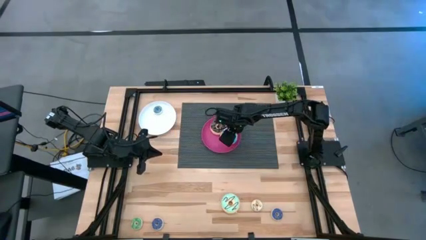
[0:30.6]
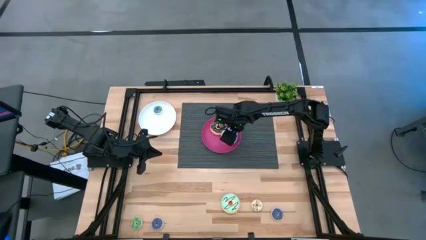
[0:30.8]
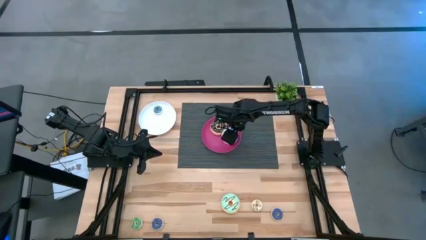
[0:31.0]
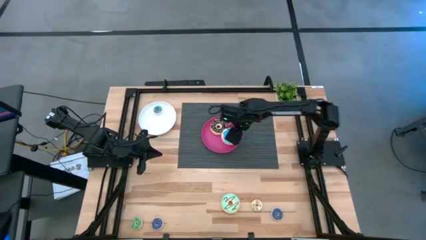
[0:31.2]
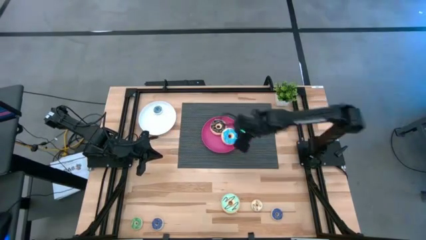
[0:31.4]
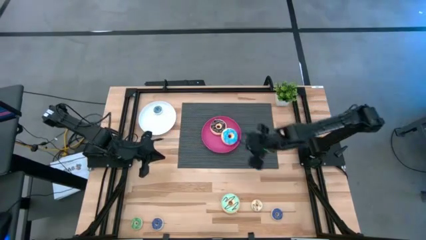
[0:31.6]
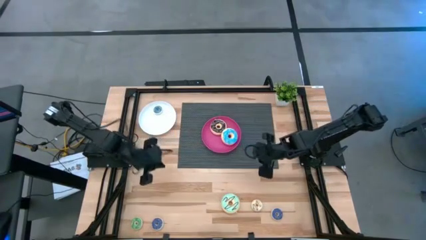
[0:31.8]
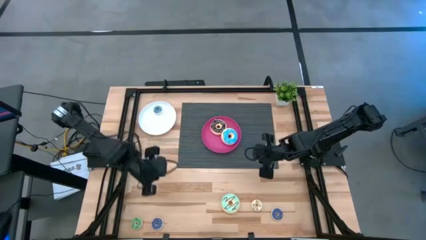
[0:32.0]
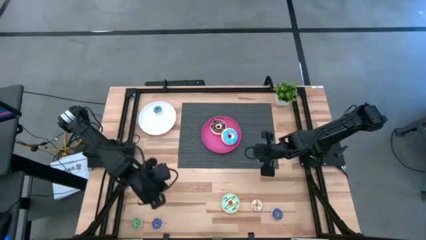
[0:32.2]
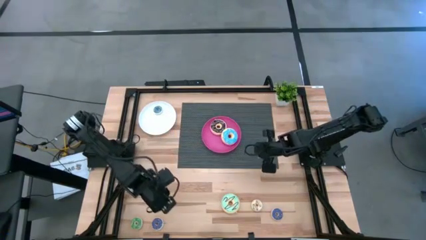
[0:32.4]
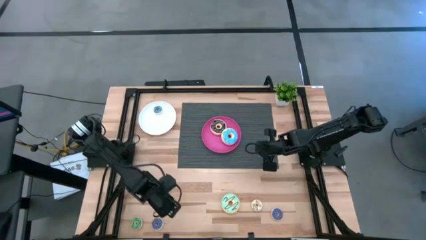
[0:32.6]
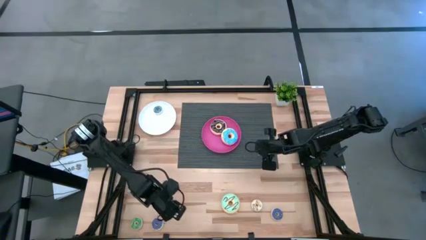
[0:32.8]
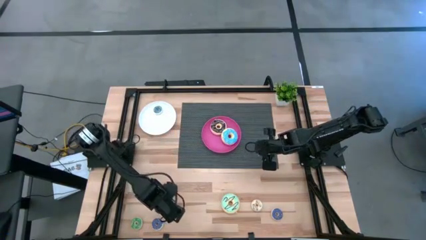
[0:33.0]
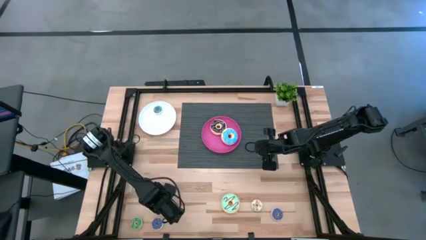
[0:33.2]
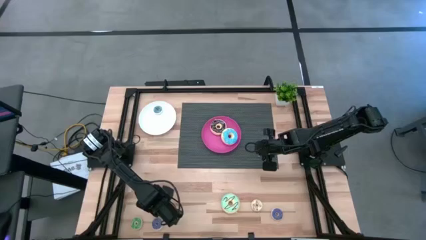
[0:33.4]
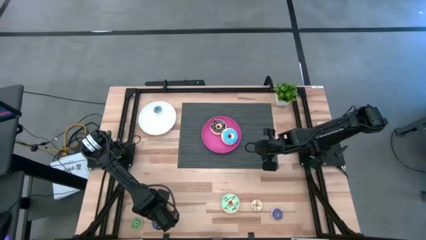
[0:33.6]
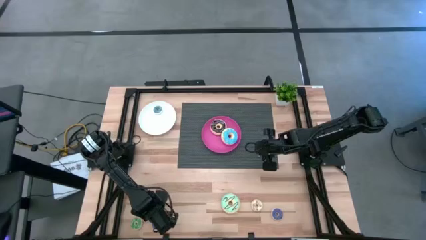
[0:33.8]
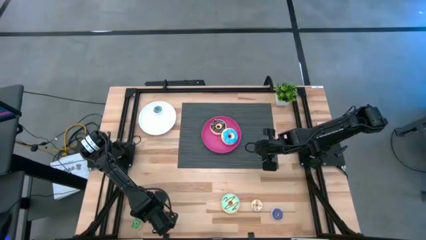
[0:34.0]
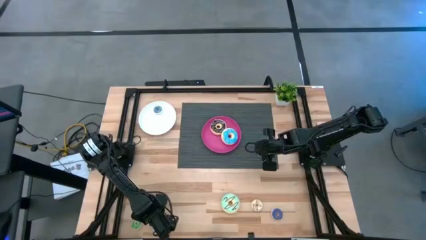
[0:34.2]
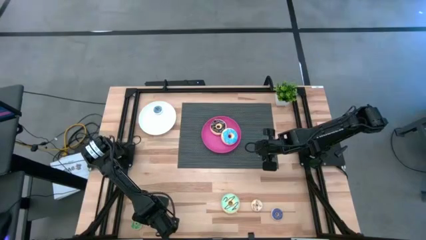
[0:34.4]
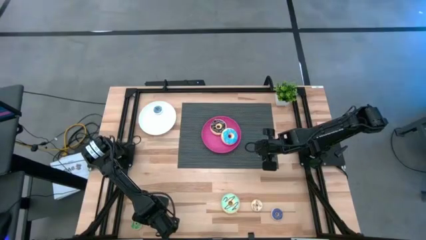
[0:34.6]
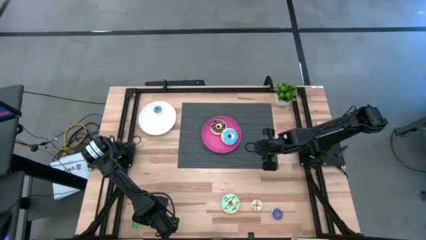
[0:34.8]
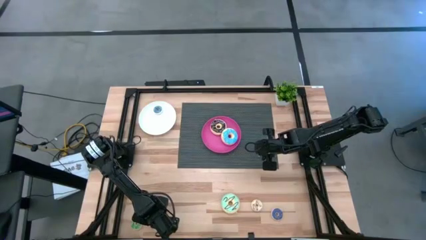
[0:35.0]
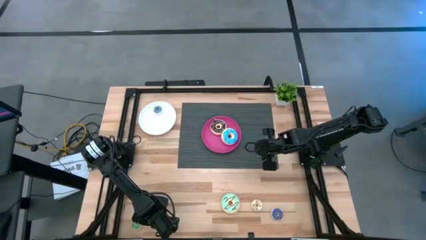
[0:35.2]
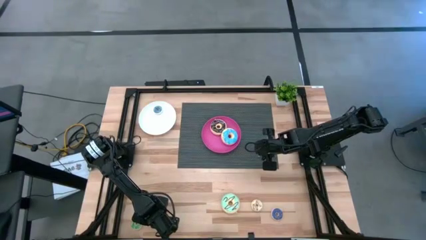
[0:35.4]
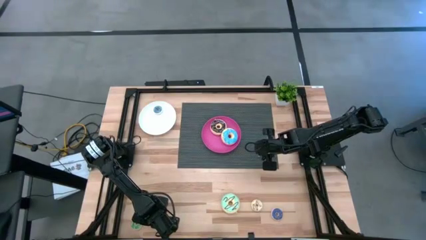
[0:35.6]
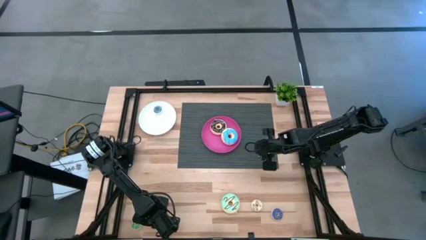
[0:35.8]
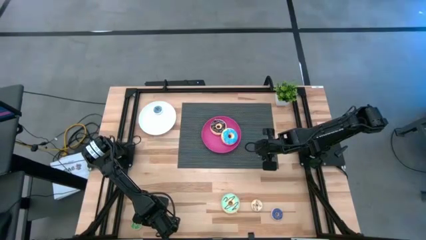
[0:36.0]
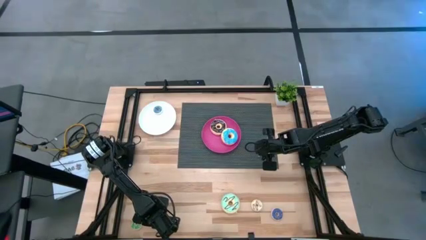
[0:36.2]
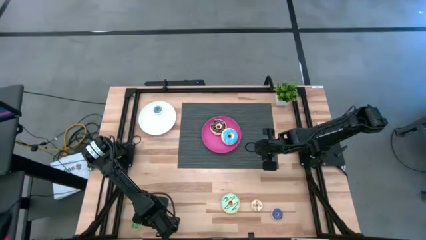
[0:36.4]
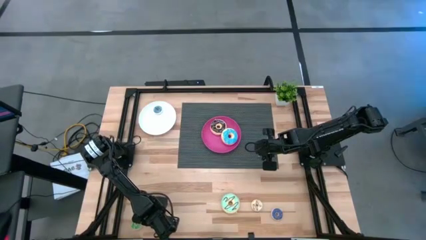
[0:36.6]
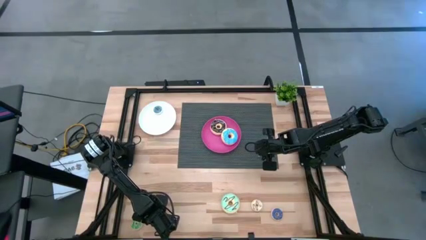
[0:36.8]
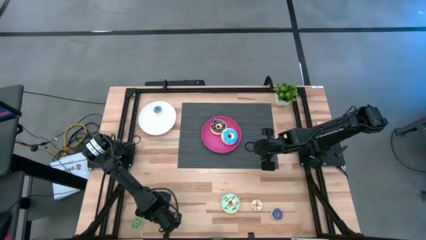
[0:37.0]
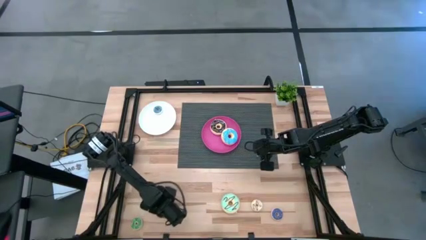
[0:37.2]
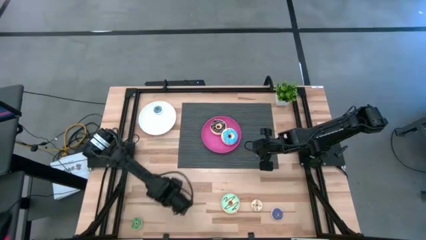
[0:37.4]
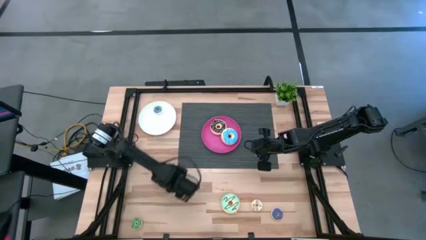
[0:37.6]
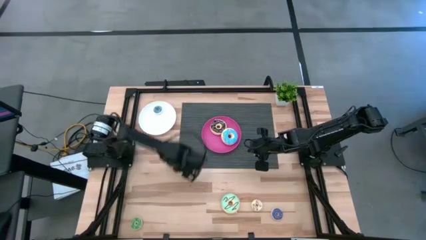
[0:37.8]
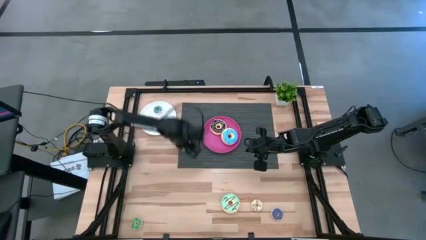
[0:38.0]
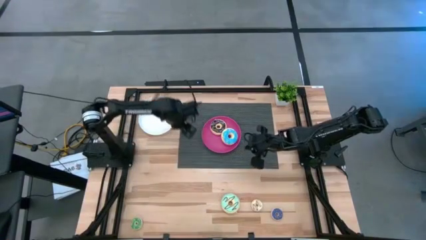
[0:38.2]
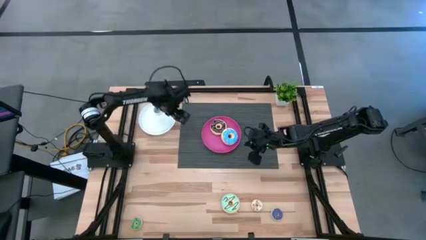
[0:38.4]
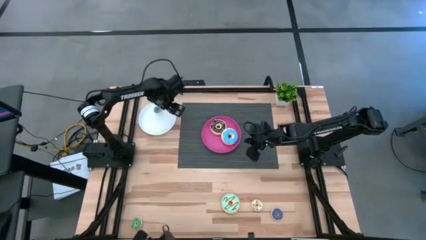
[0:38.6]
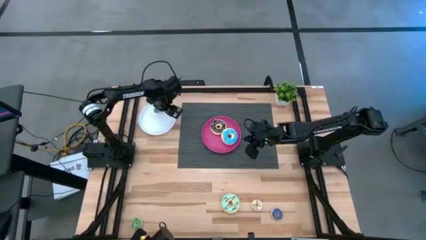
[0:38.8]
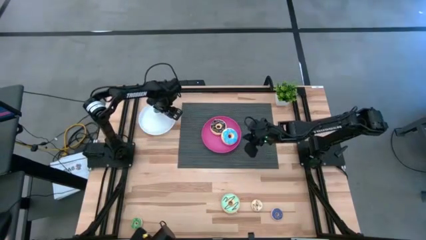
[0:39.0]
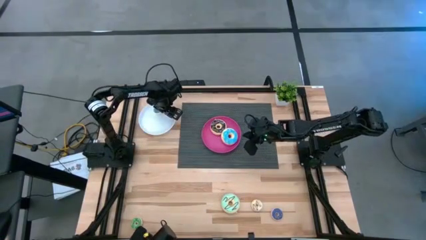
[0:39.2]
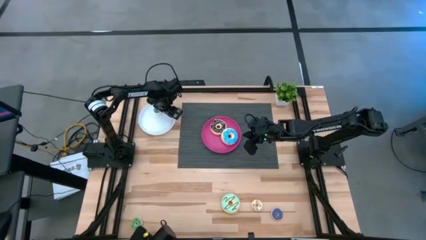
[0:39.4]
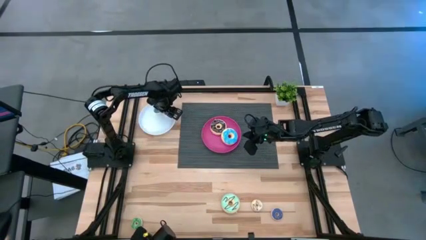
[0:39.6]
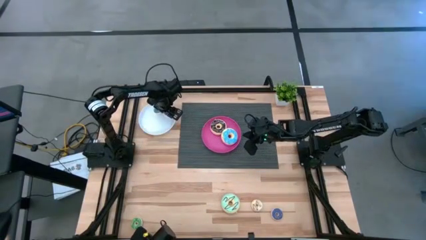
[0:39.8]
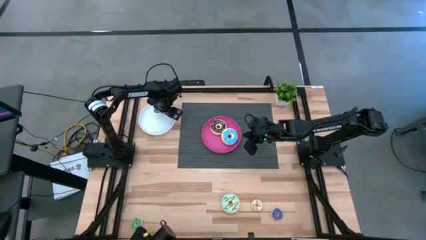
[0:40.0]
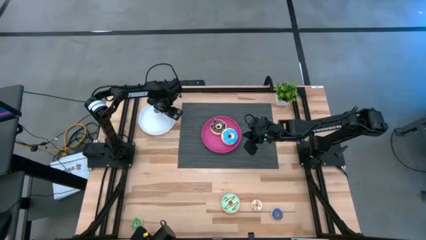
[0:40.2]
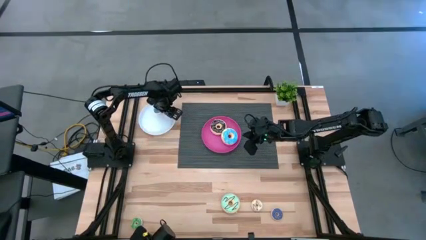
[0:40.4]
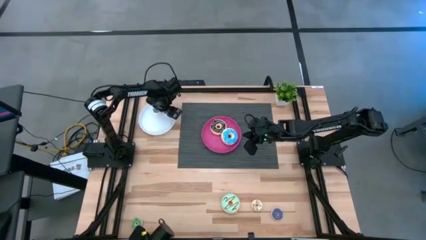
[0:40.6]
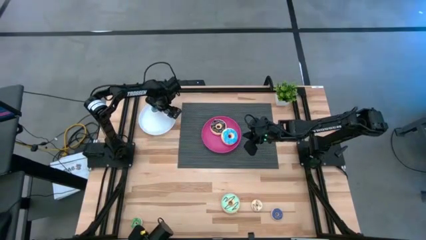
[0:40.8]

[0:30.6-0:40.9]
Task: Pick & Place donuts
Put the left small violet donut on the white plate

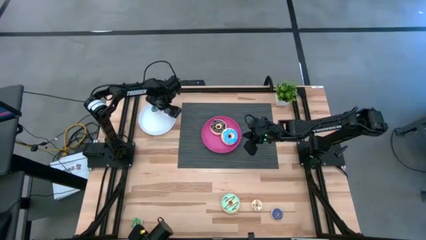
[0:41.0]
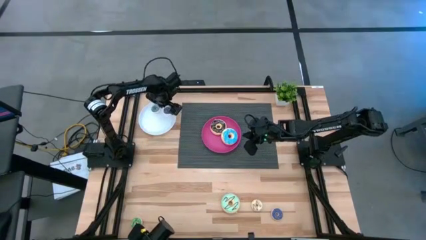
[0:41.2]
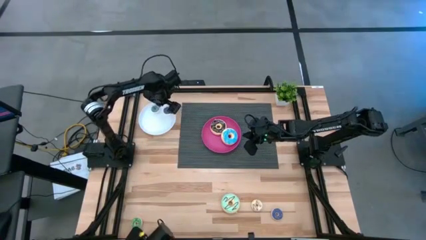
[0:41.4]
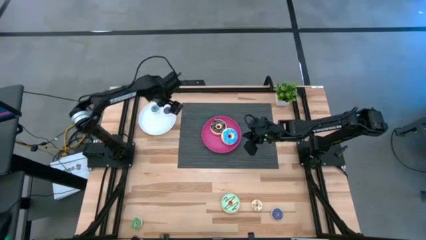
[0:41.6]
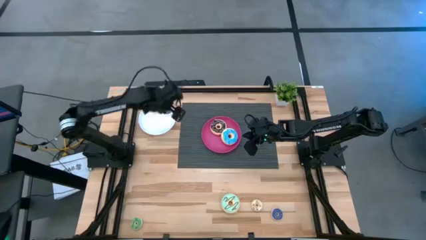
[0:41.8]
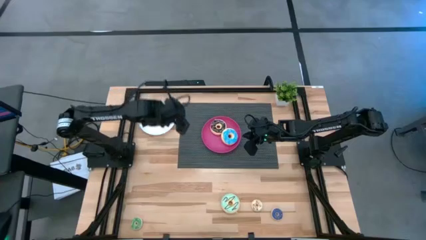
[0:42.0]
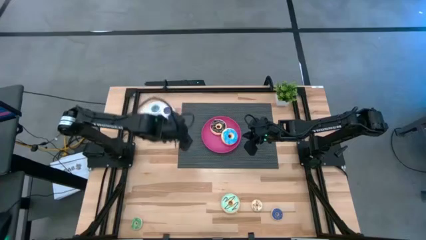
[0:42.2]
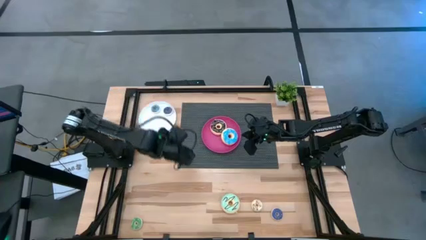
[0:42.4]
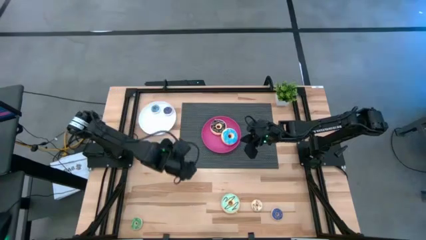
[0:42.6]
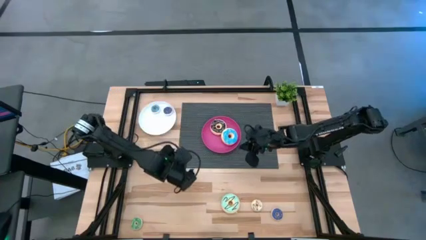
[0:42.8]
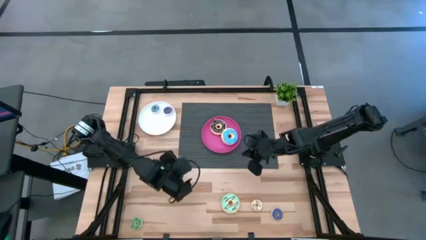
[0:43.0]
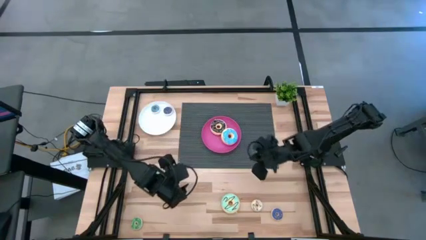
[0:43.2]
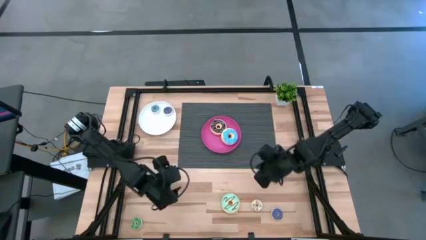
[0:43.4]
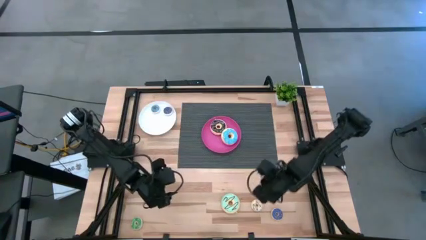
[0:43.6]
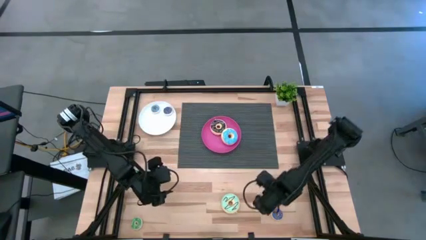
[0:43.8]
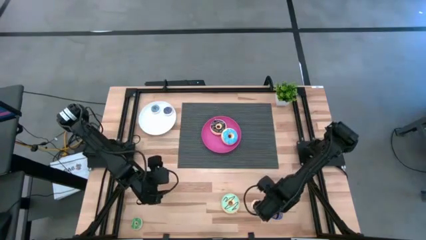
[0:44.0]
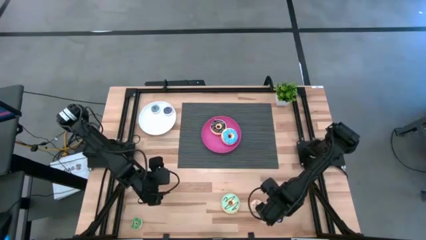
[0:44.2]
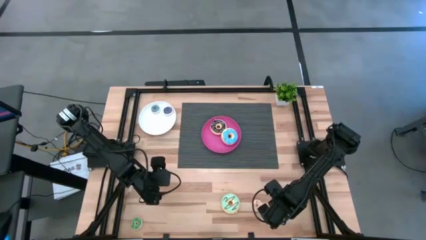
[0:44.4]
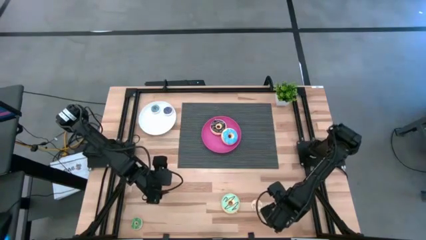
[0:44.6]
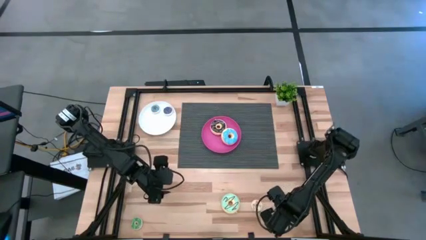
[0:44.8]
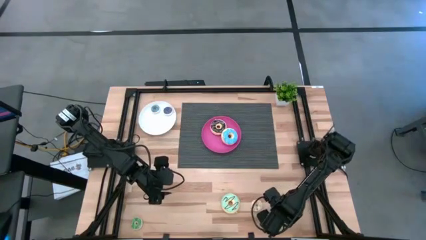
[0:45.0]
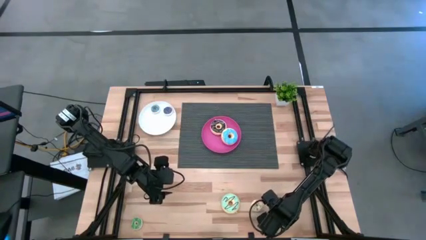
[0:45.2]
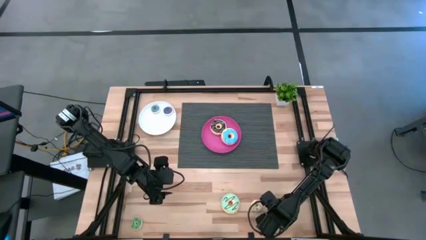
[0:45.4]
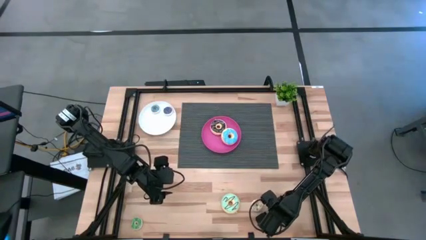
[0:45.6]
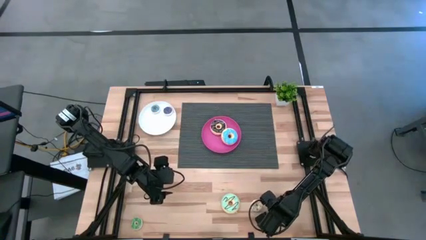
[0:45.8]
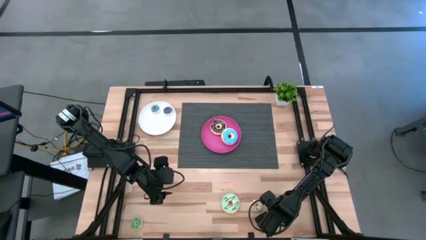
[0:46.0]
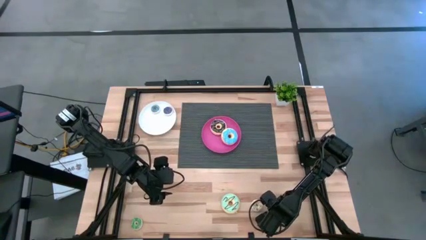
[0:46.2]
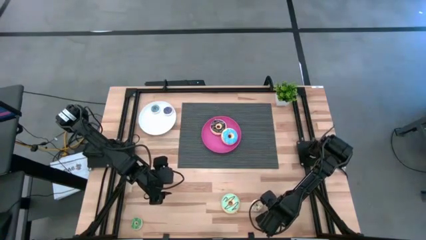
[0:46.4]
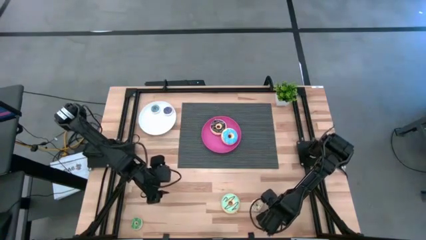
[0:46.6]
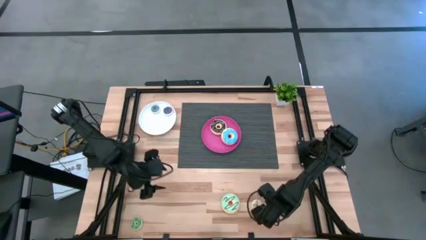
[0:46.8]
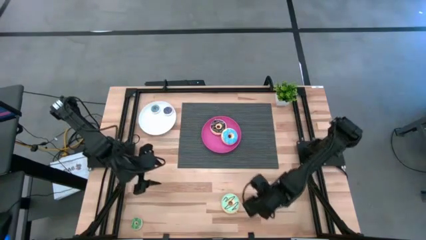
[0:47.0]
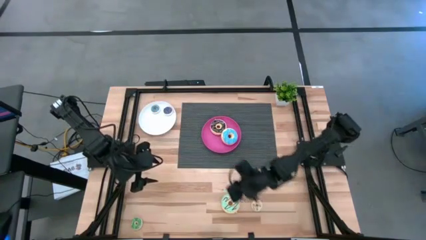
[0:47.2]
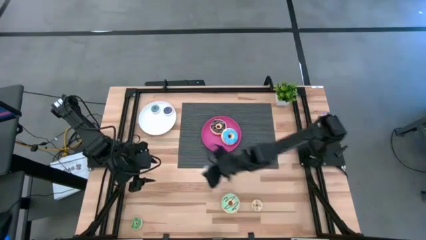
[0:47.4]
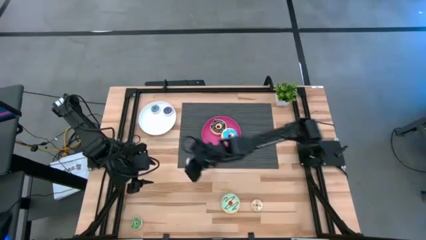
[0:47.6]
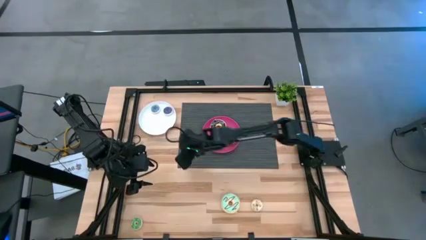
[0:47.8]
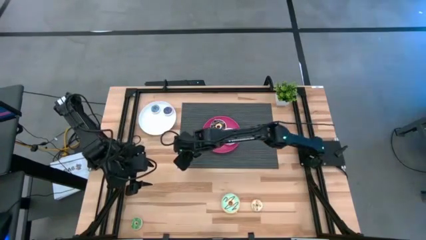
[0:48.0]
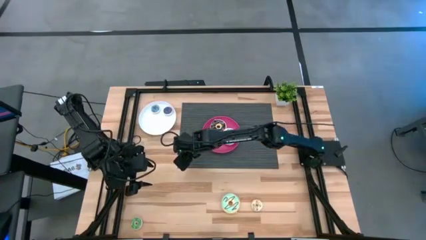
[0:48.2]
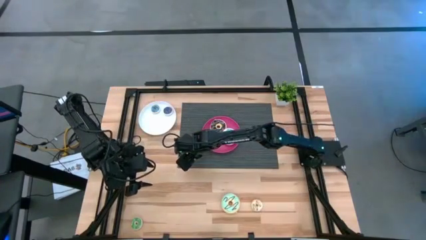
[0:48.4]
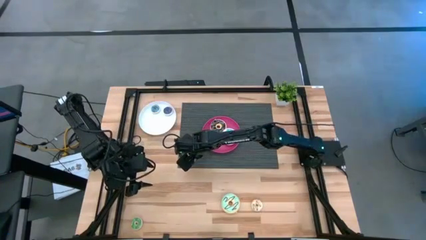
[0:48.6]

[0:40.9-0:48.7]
Move the small violet donut to the center of the table
